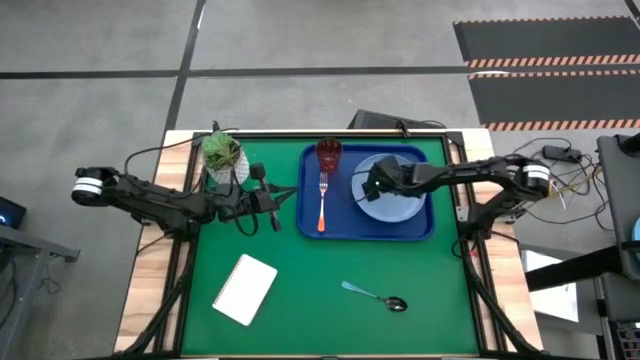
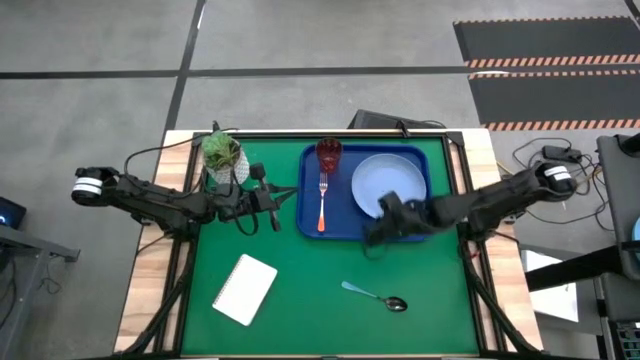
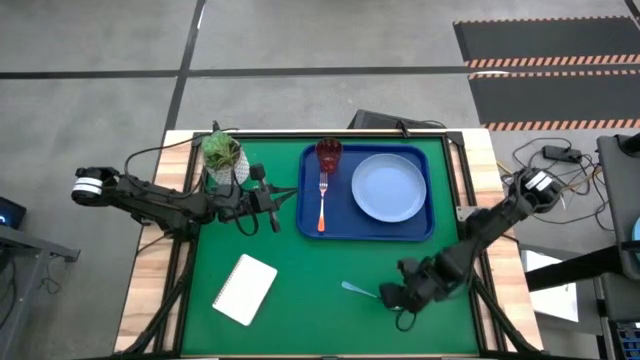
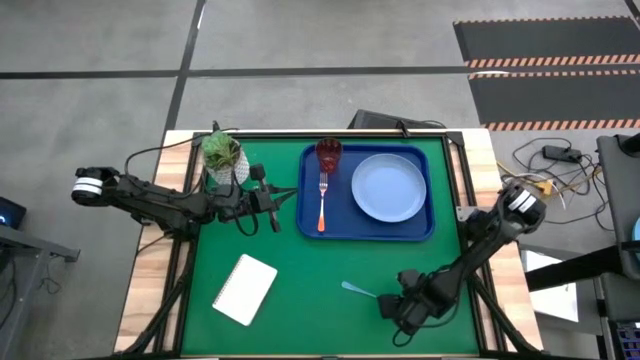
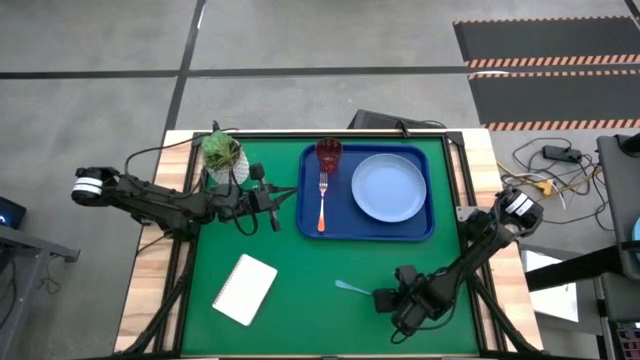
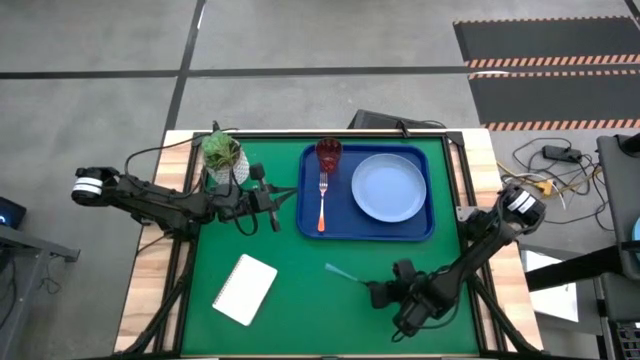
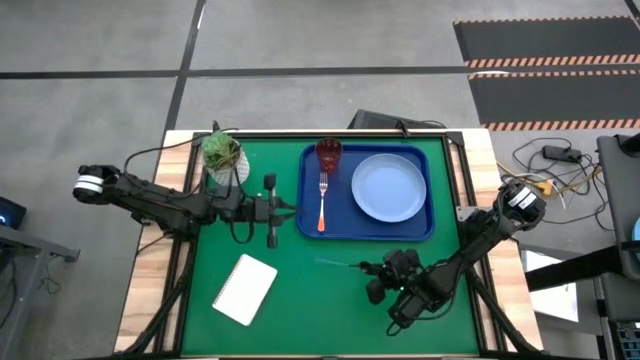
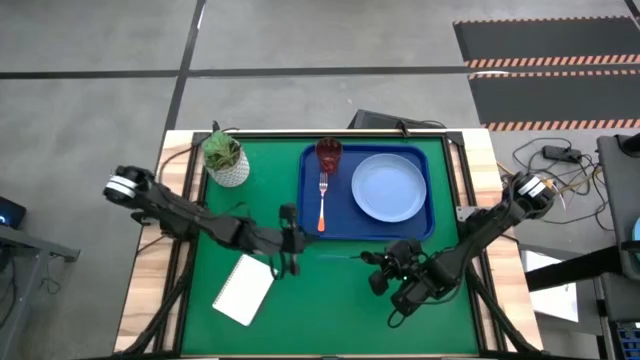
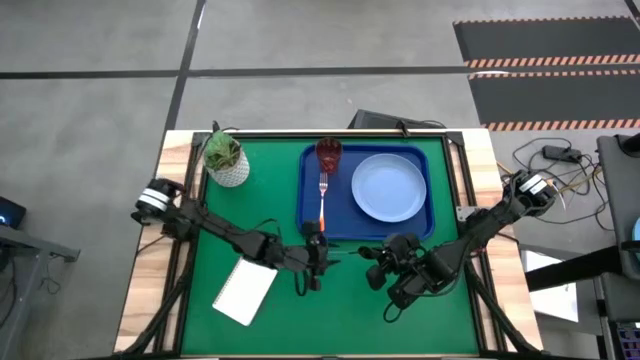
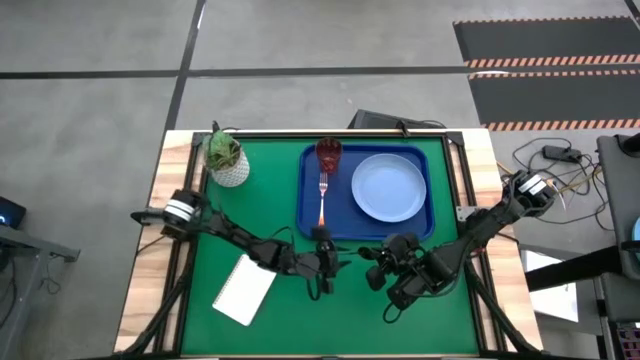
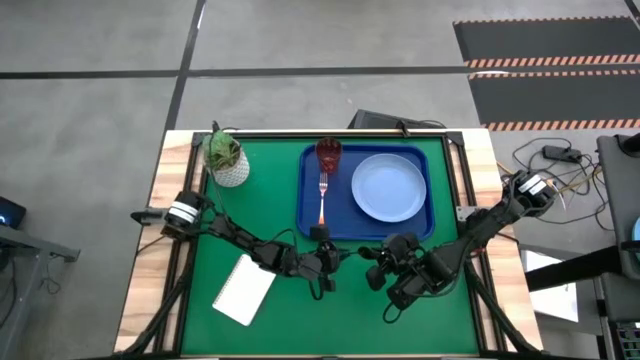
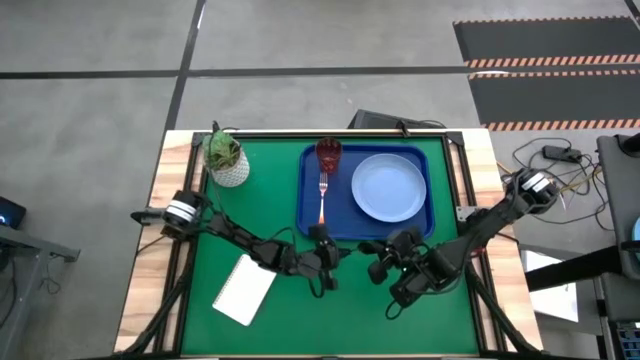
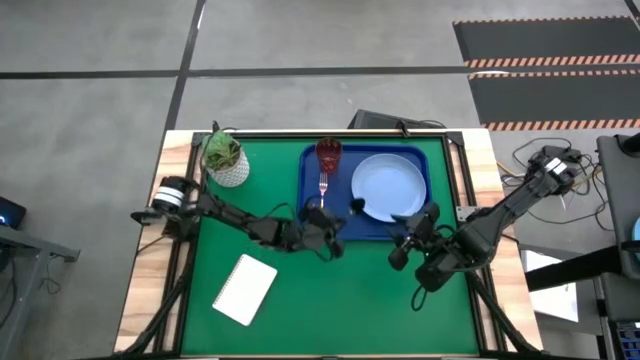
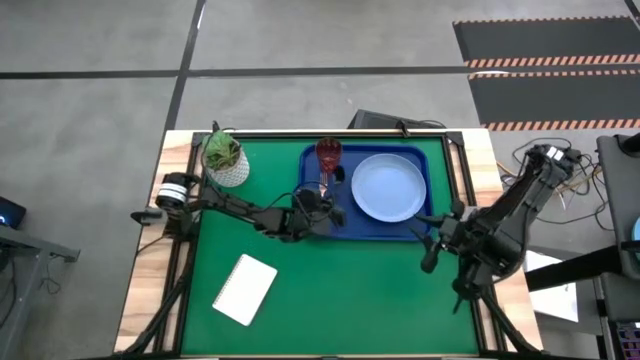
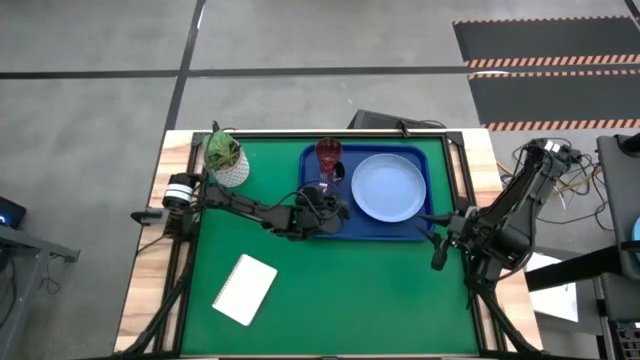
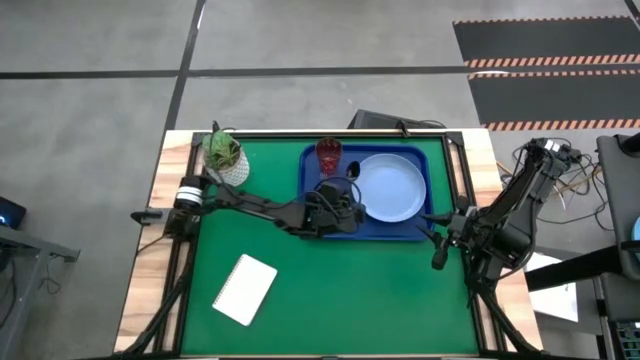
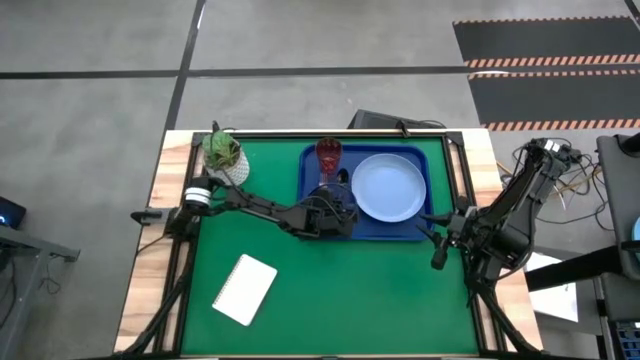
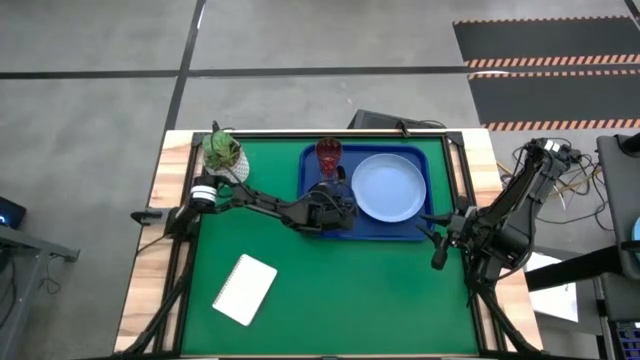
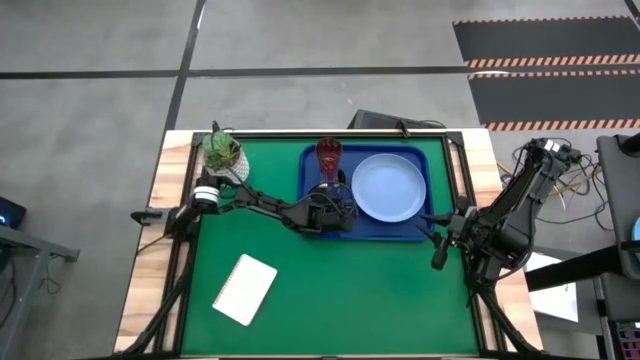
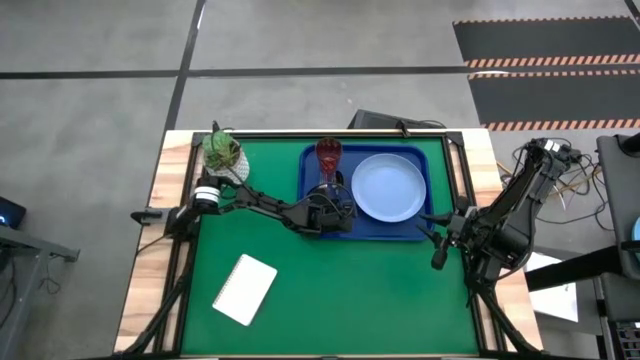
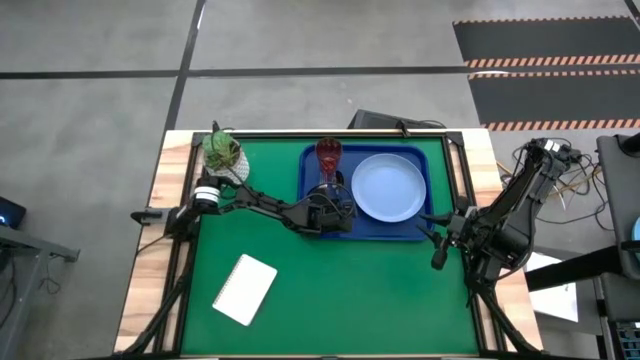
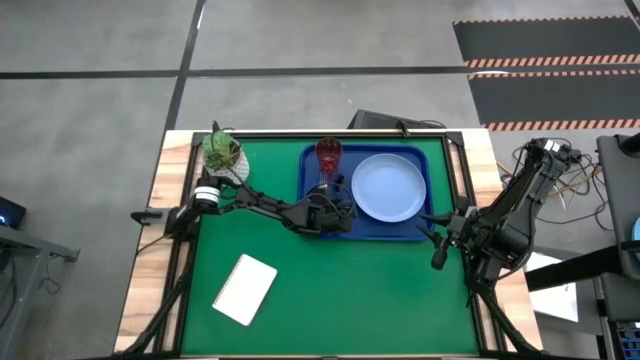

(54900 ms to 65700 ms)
Task: Pick and place plate/cup/fork/spoon on tray
Put the blue spoon on the blue tray to the right of the orange fork

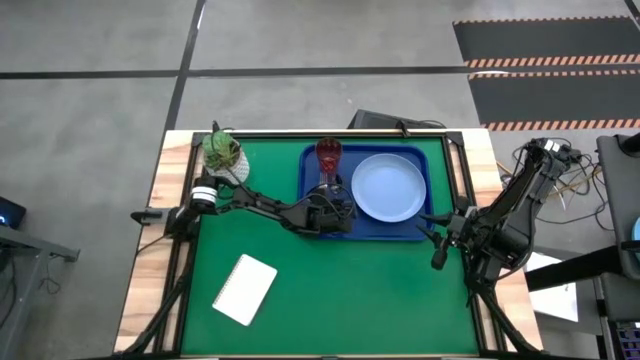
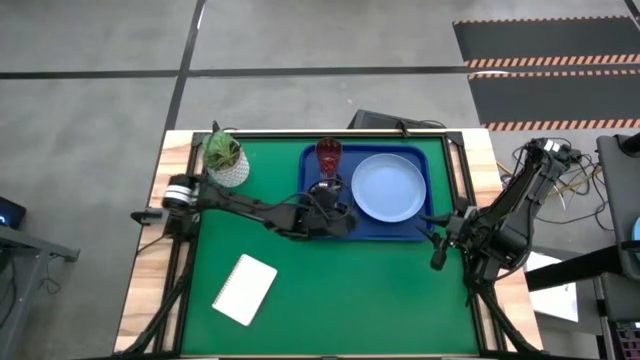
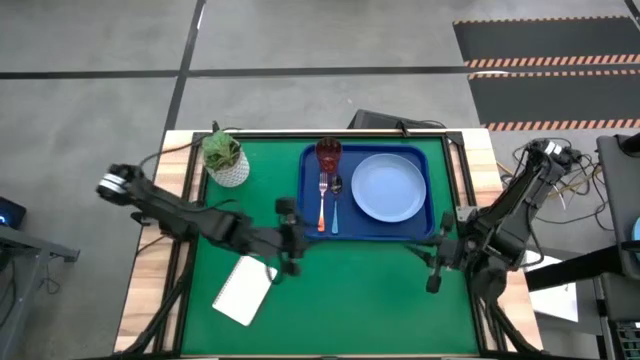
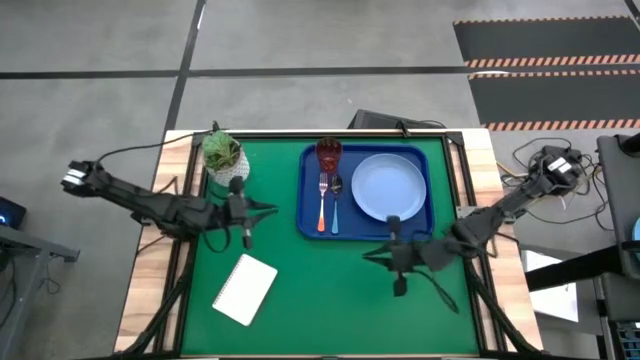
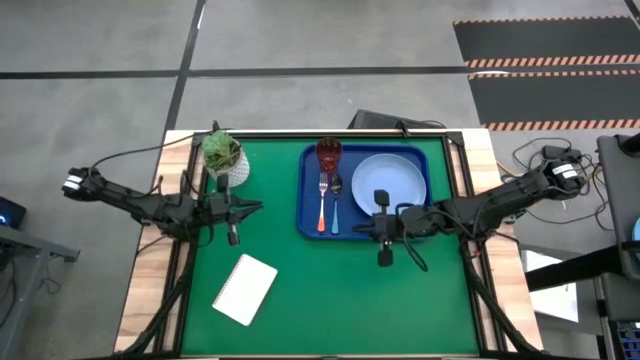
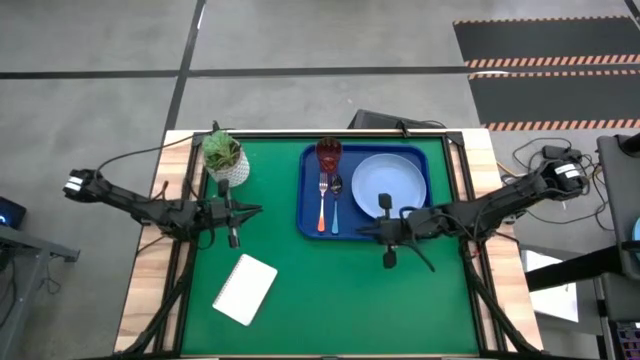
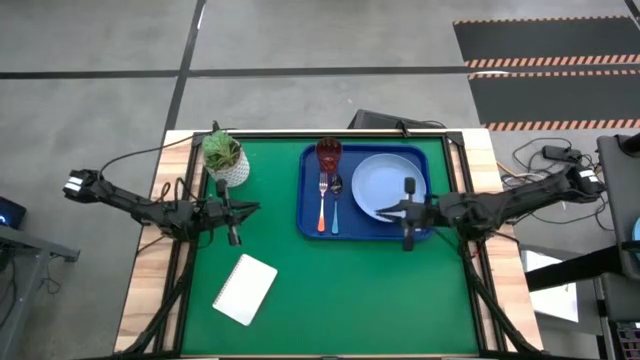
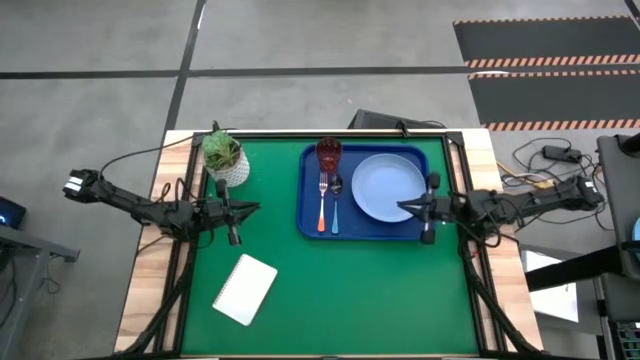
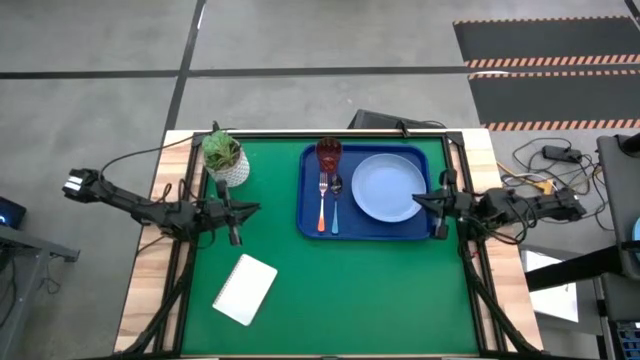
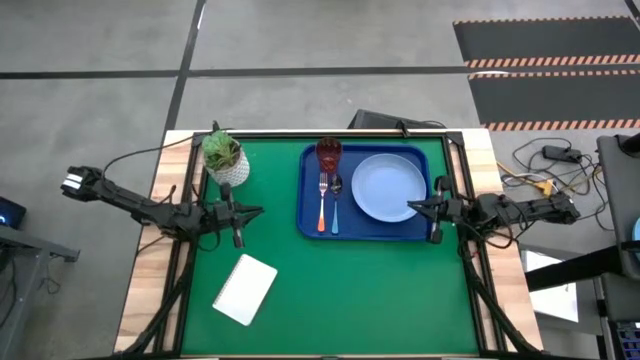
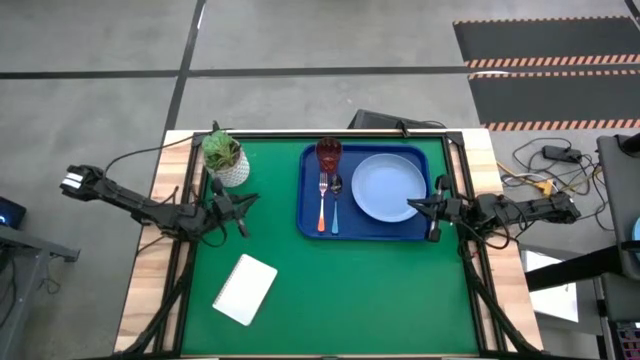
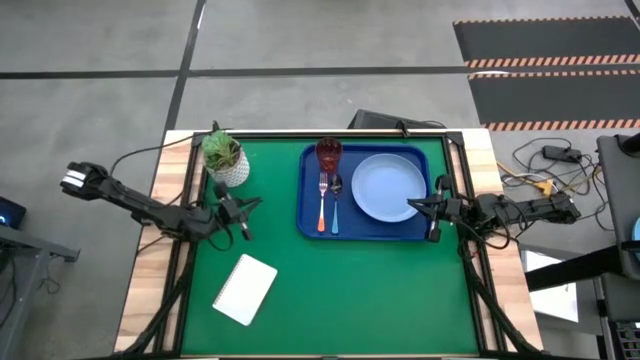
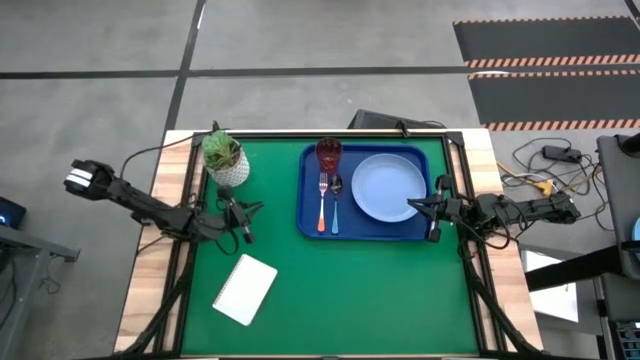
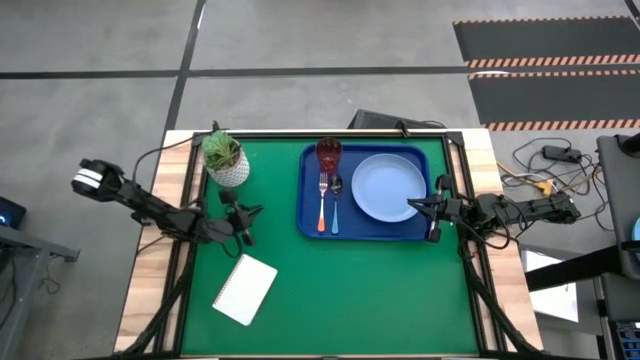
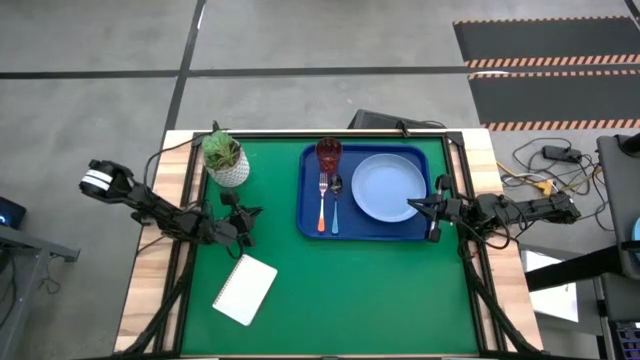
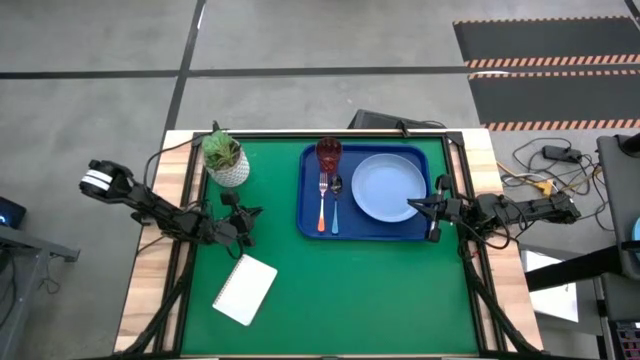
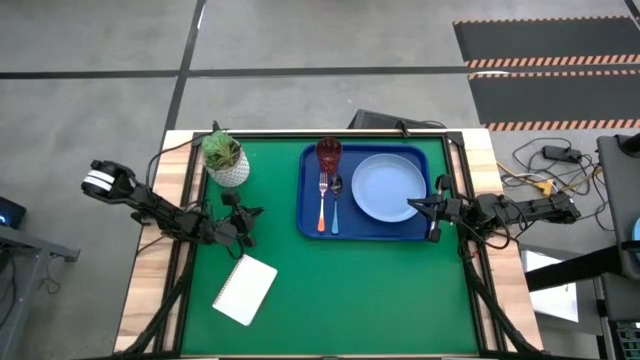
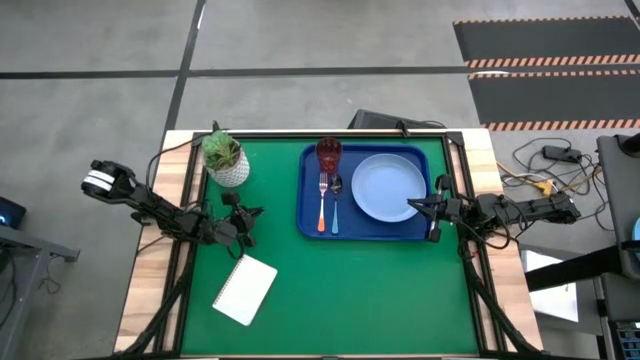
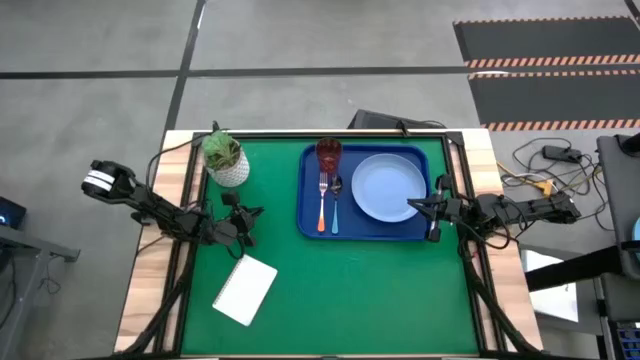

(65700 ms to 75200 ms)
Return to Home Position
